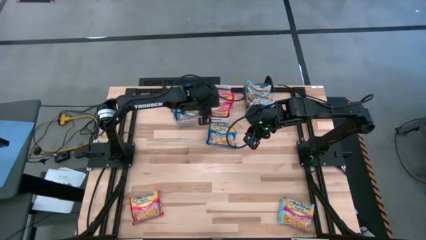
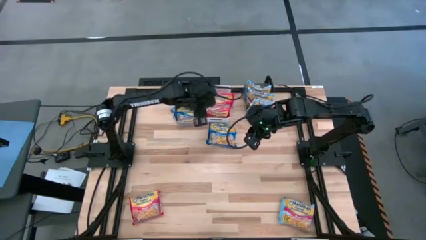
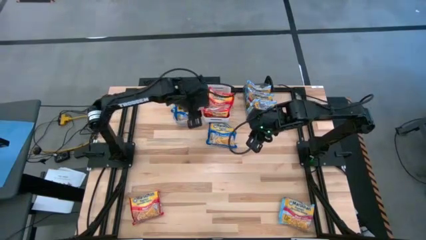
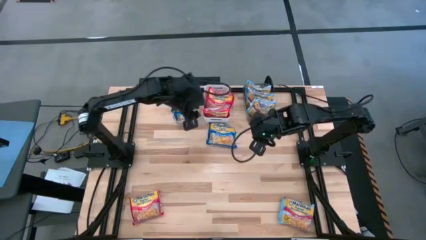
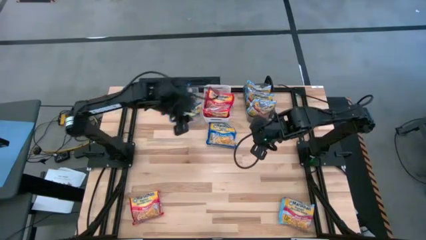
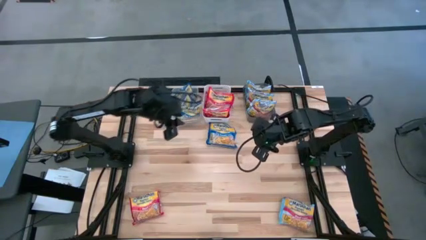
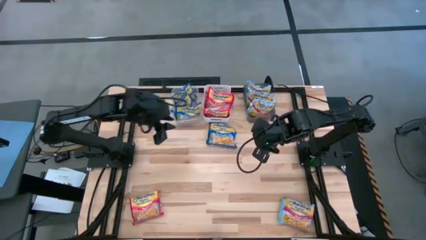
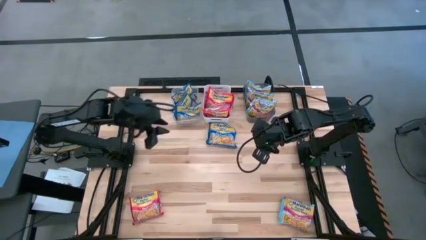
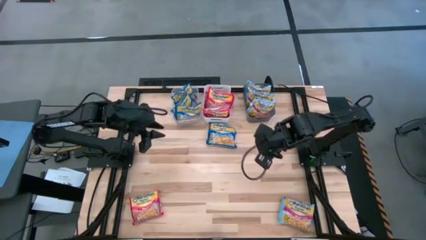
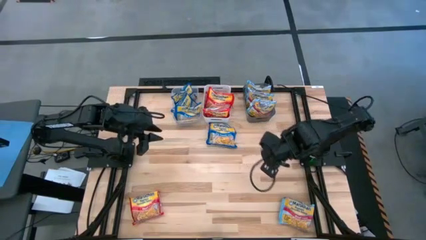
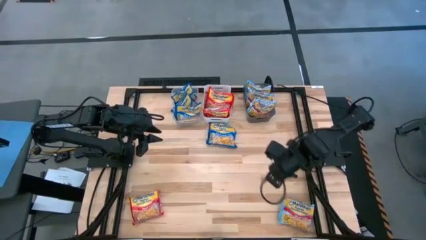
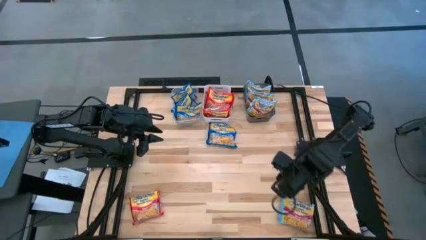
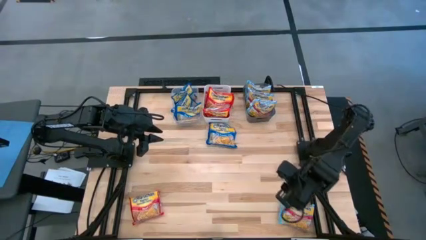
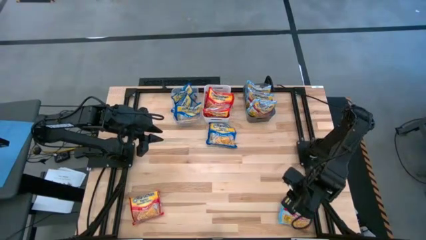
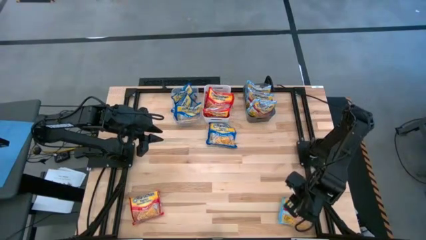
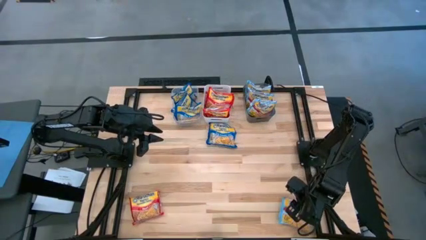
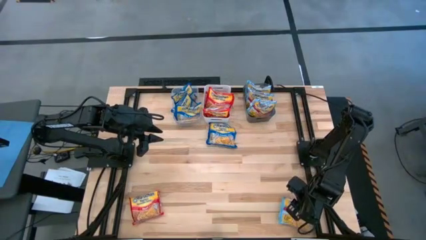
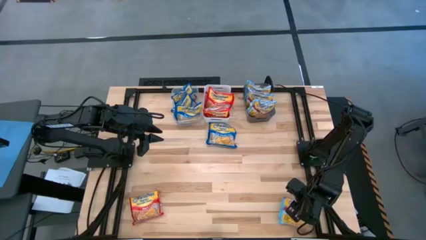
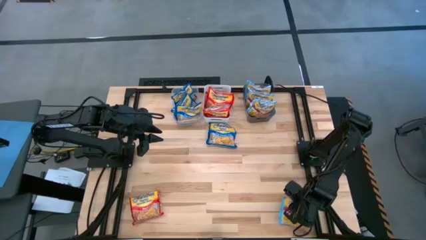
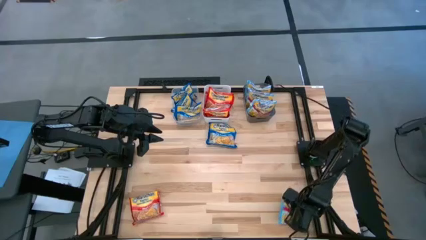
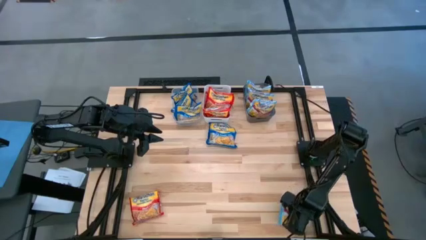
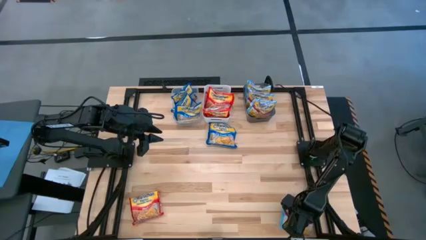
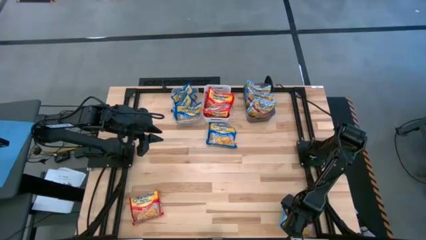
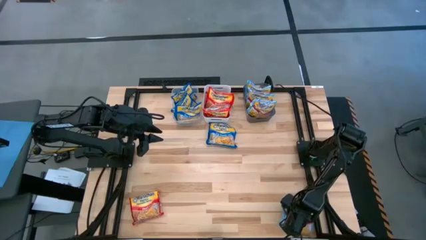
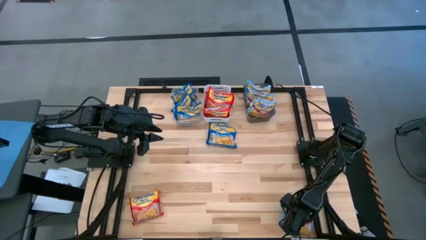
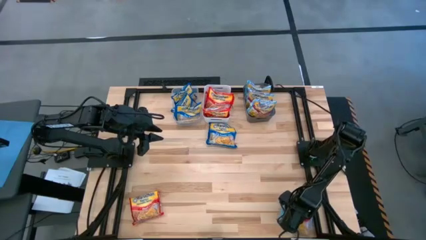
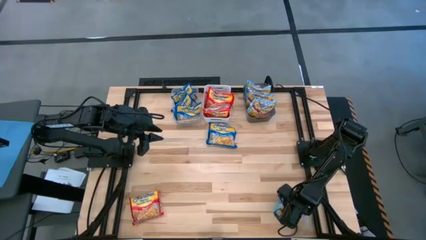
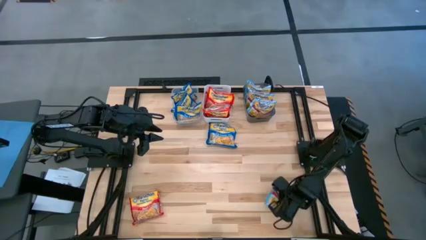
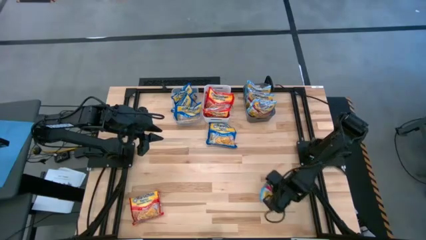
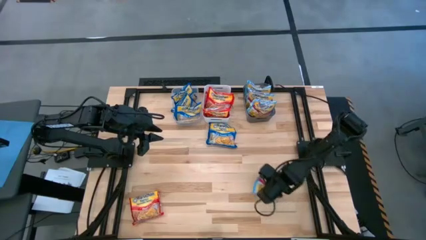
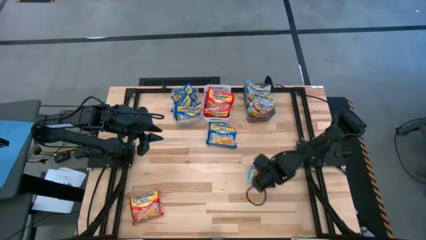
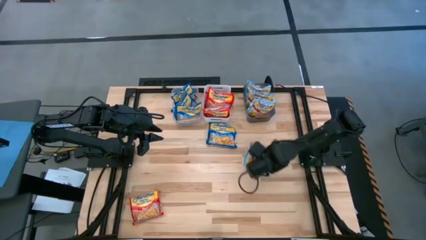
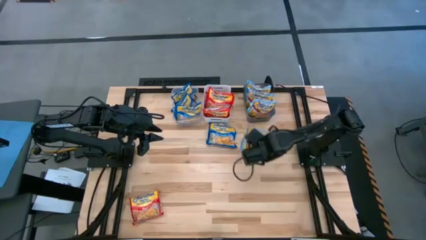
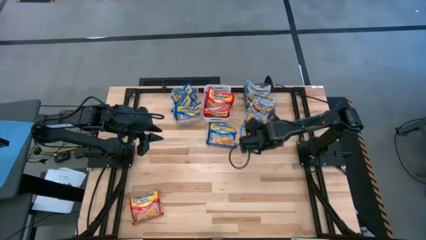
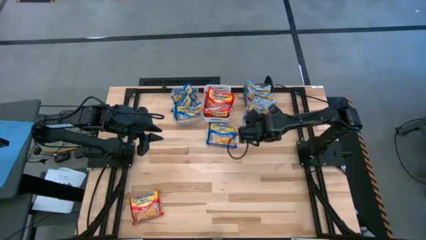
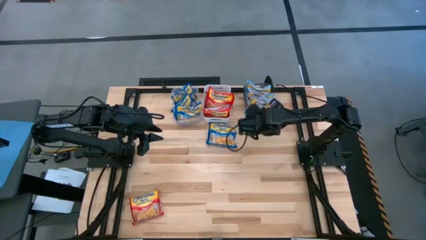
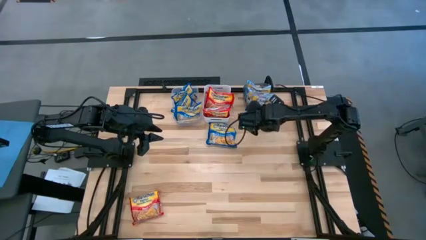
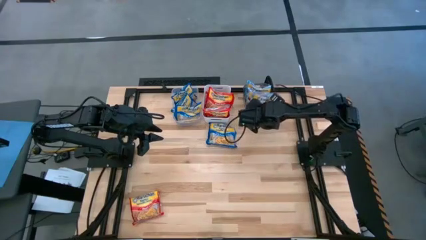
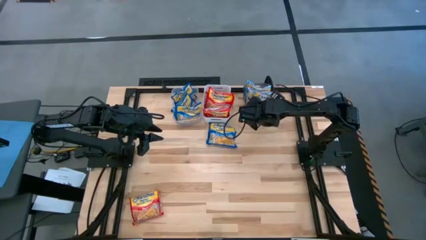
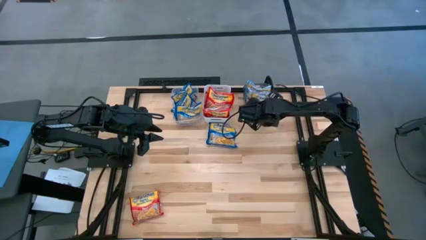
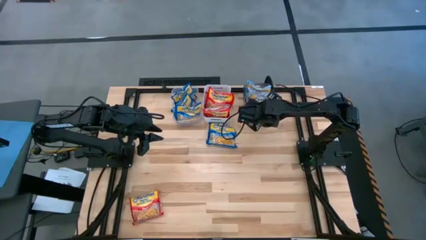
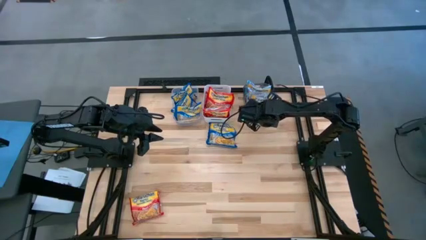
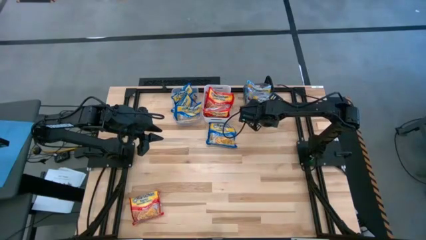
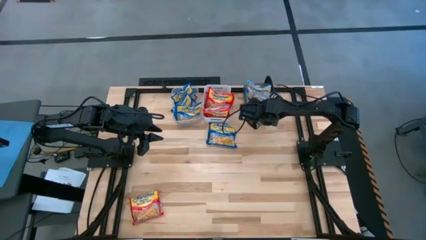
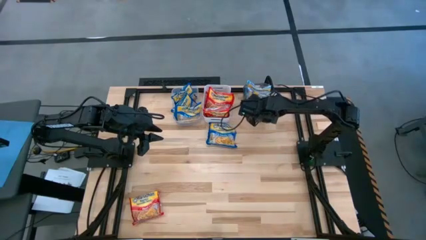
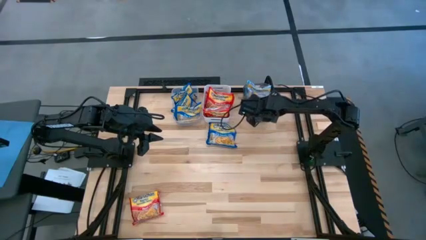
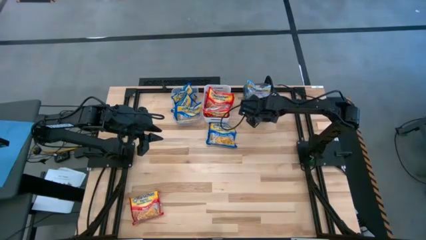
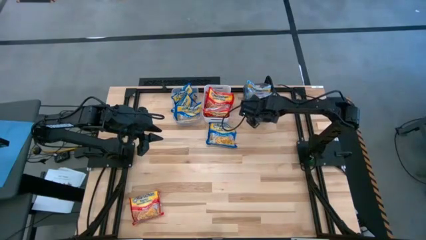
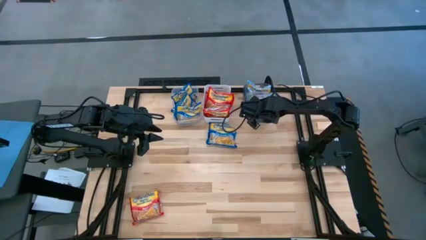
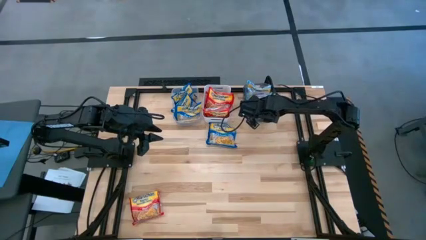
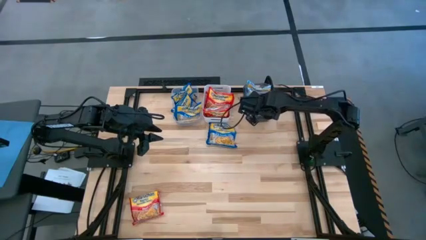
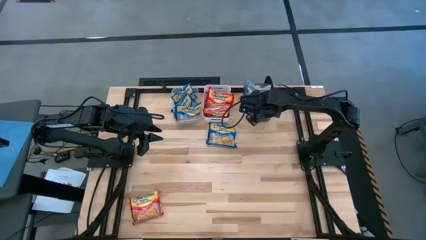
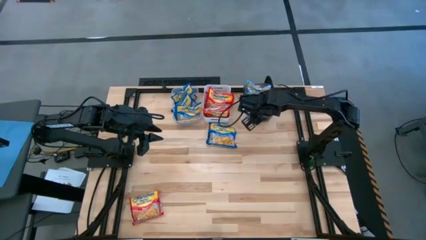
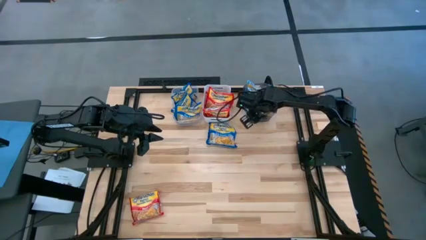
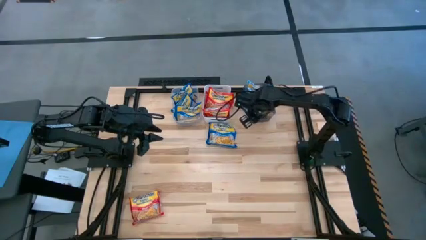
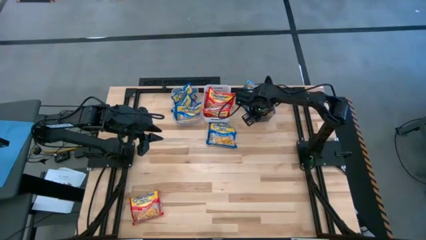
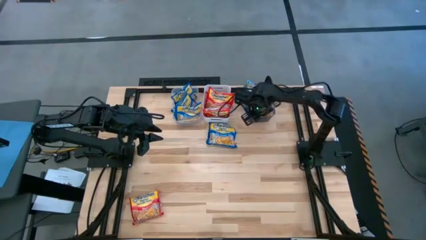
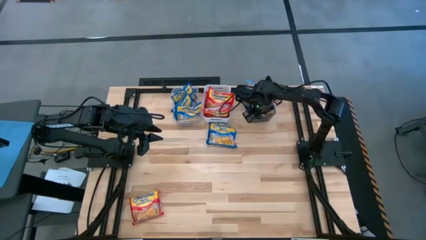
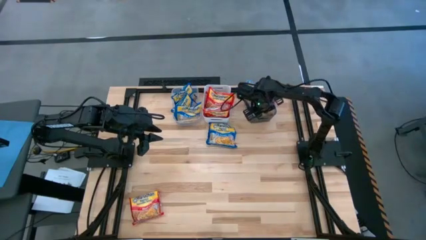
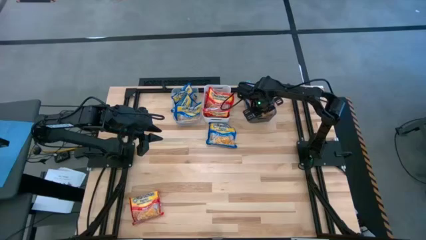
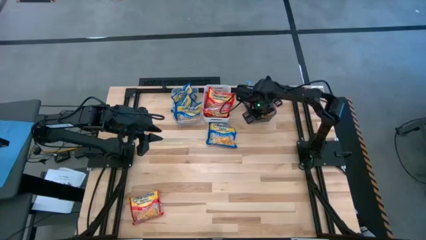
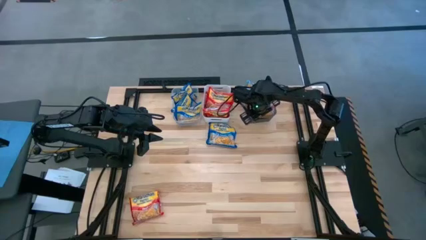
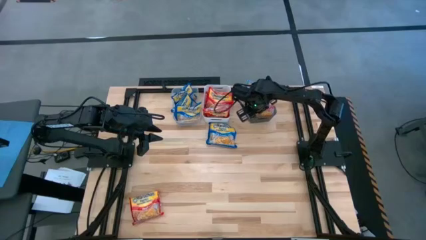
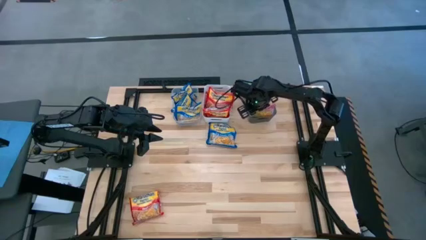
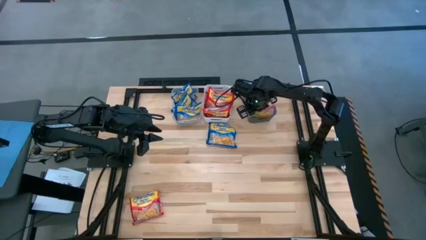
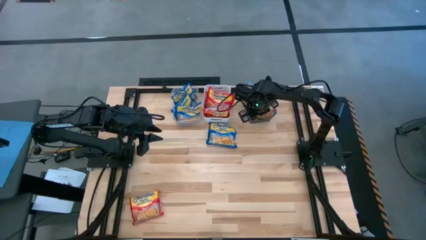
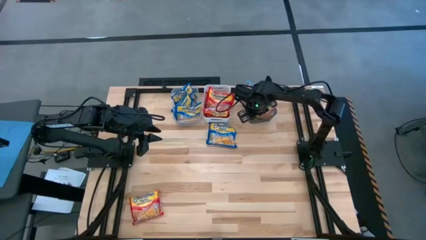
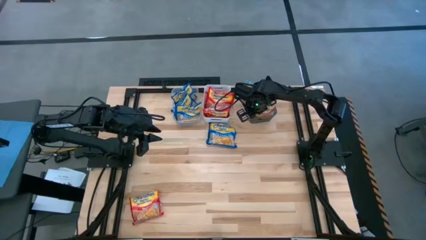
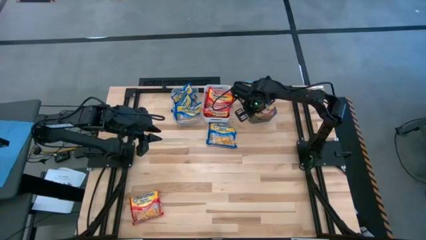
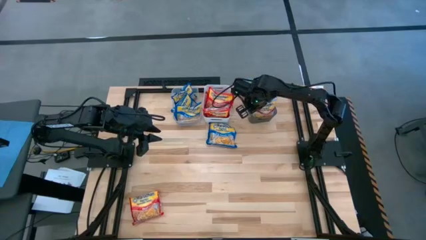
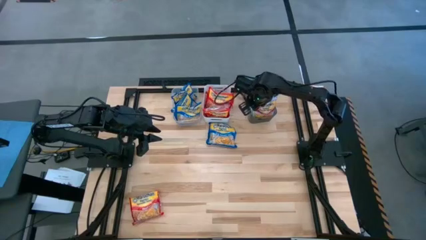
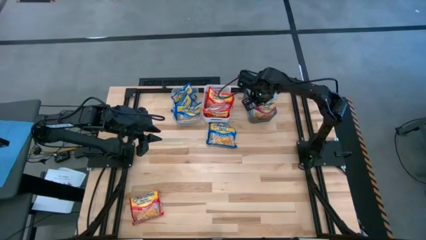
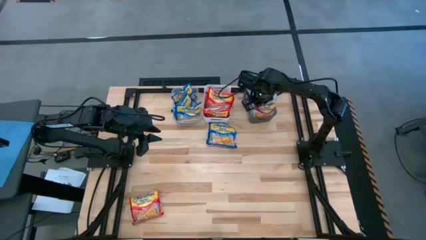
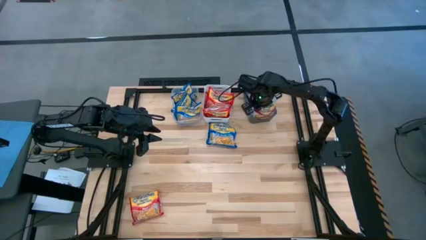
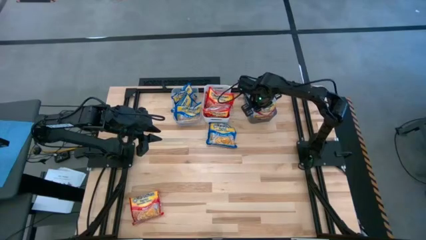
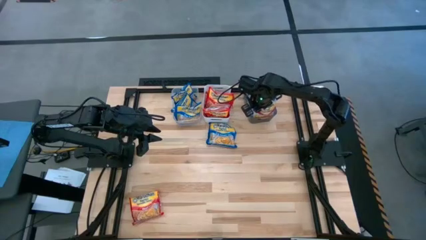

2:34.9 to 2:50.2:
Task: Sort Maruchan noodles
Put the light blue noodle pack into the black bin
